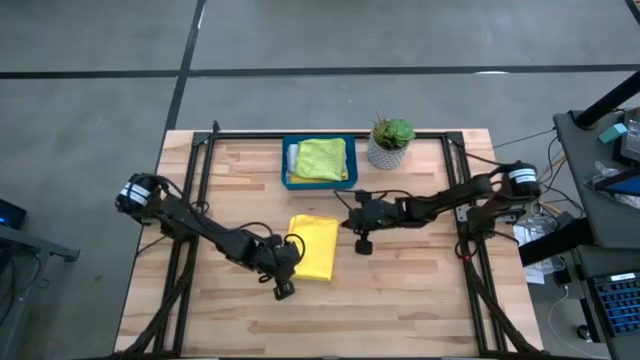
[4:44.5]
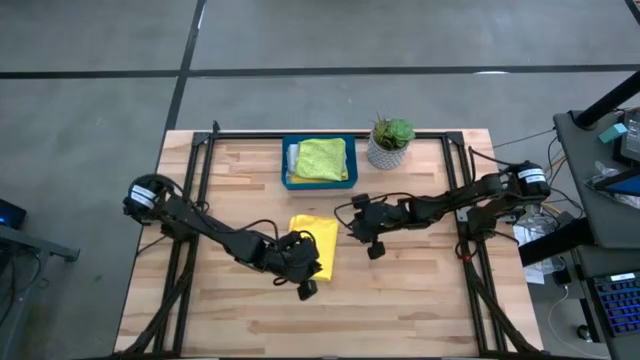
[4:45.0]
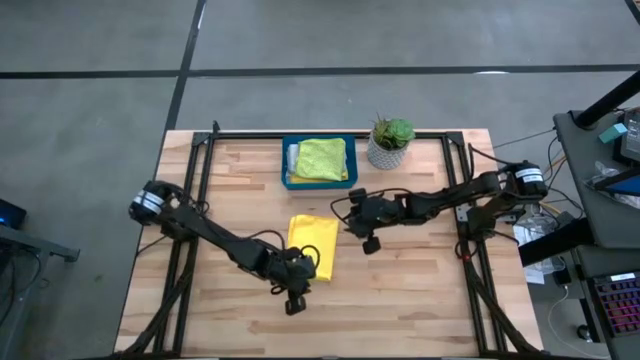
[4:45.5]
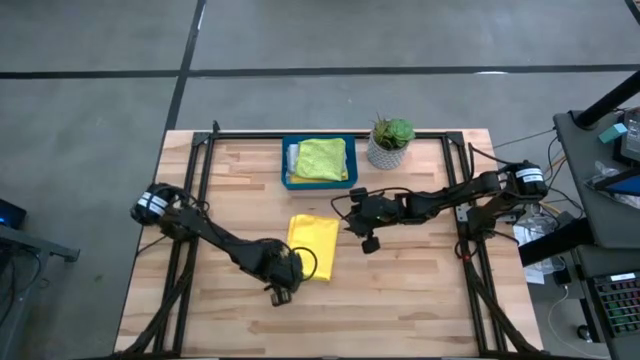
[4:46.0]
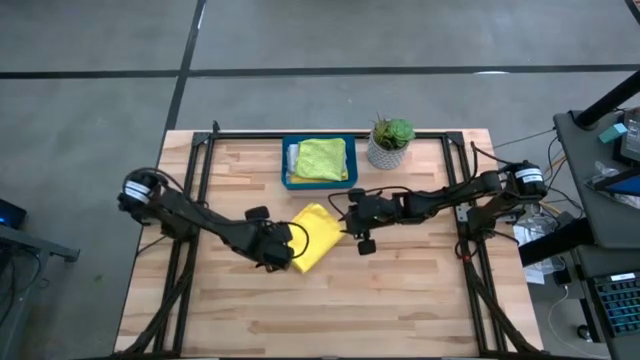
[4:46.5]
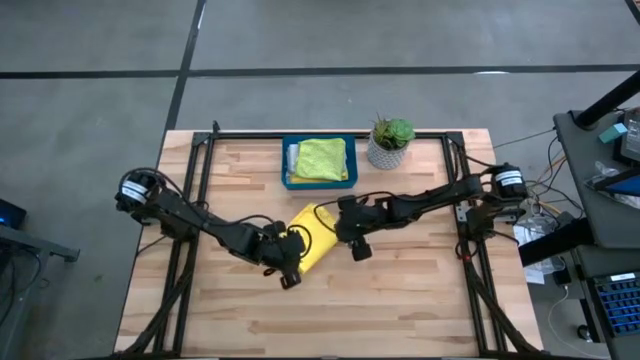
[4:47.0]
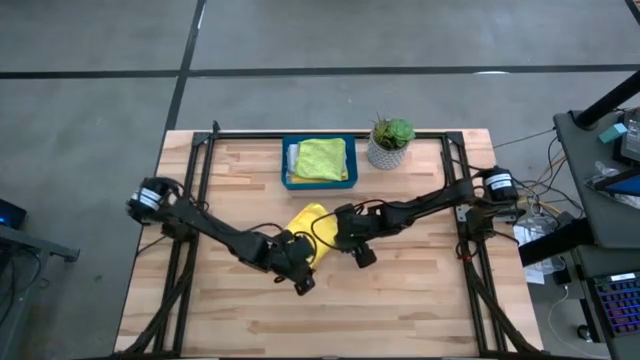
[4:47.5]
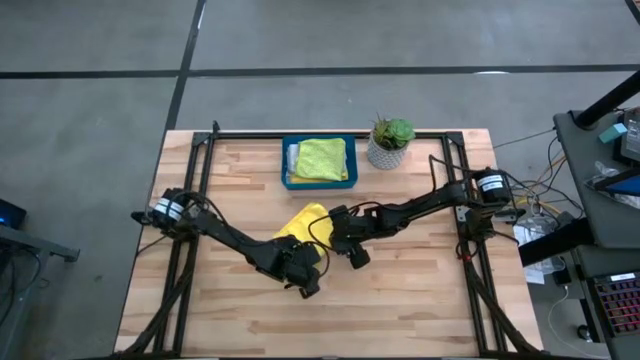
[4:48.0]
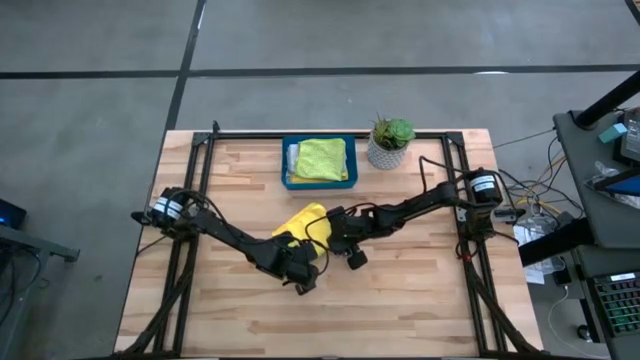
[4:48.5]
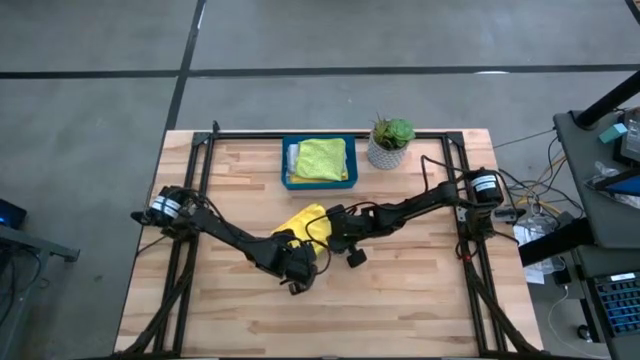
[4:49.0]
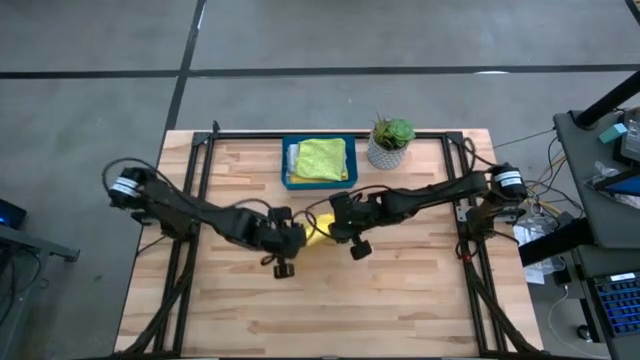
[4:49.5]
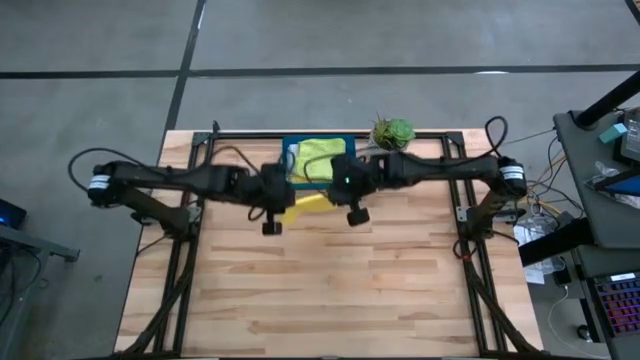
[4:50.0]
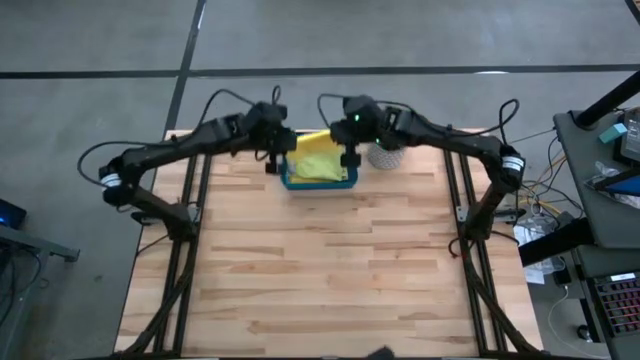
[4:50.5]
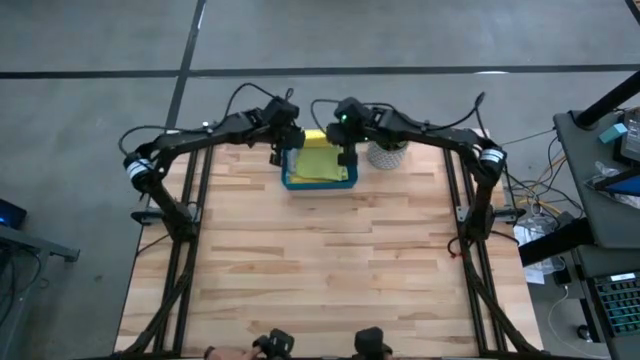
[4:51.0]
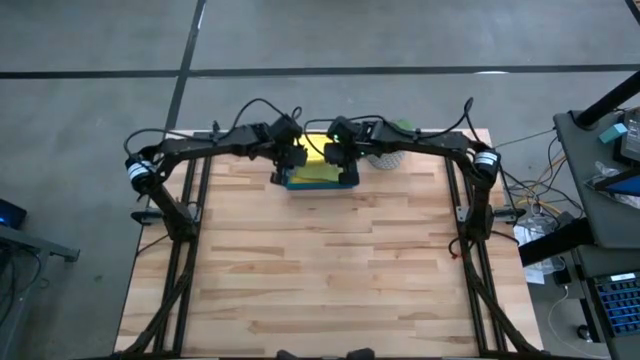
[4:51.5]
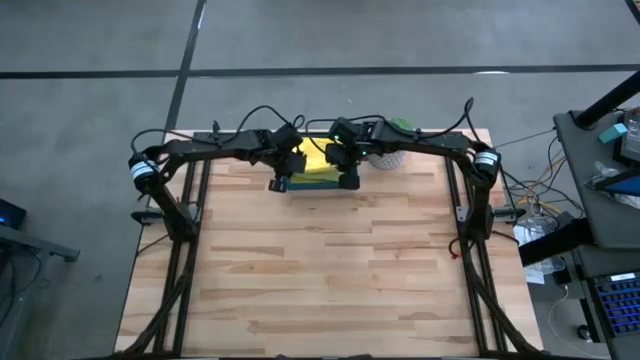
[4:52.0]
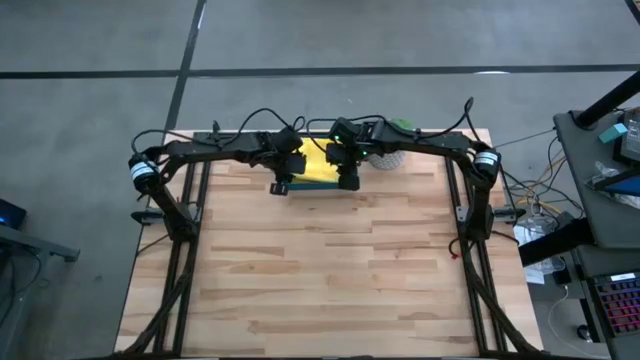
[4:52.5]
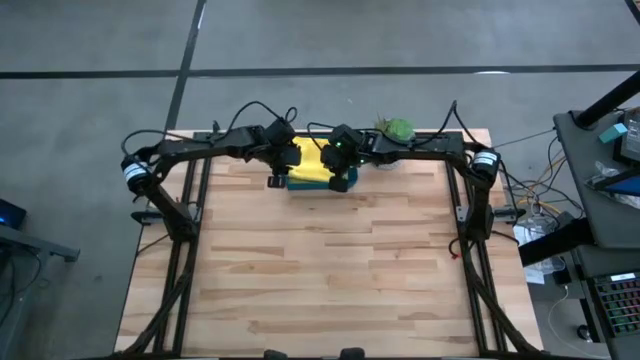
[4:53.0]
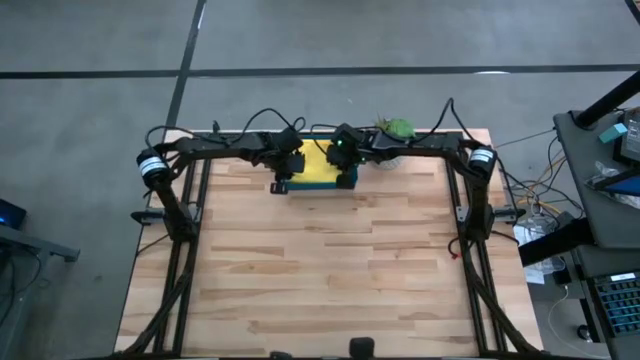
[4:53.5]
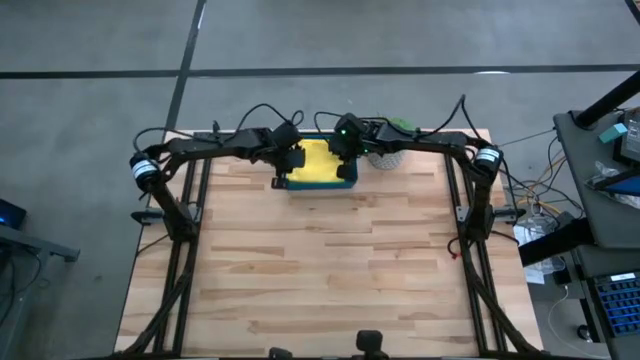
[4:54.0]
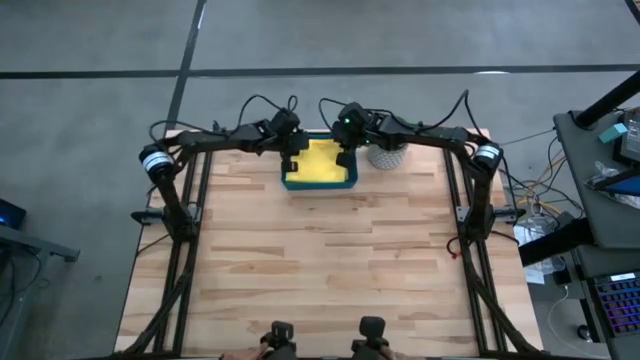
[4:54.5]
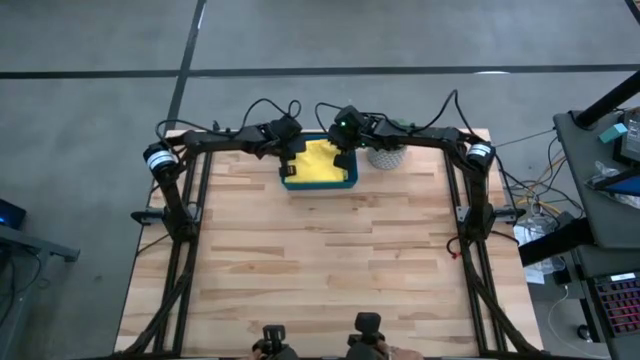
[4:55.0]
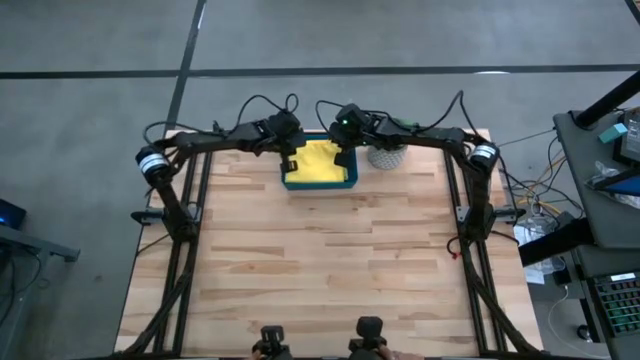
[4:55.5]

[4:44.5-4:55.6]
Task: Fold microfiber towels
Stack the folded yellow microfiber cloth on top of the green microfiber cloth

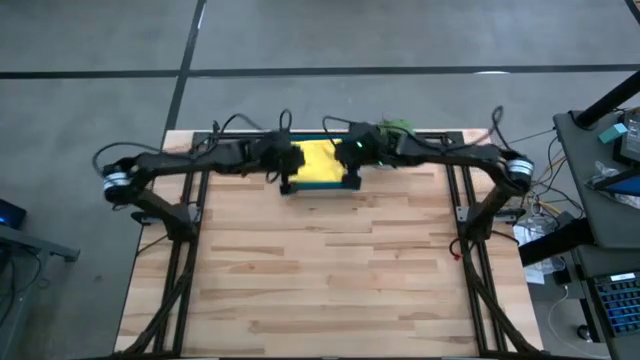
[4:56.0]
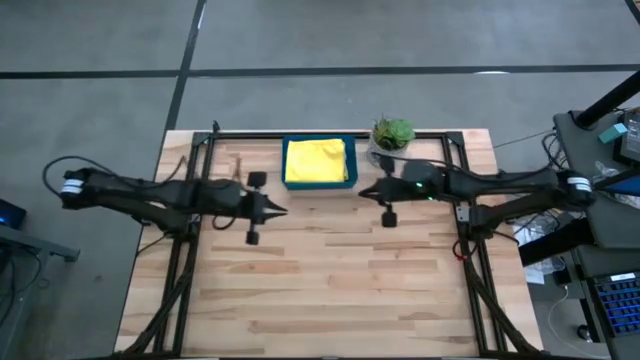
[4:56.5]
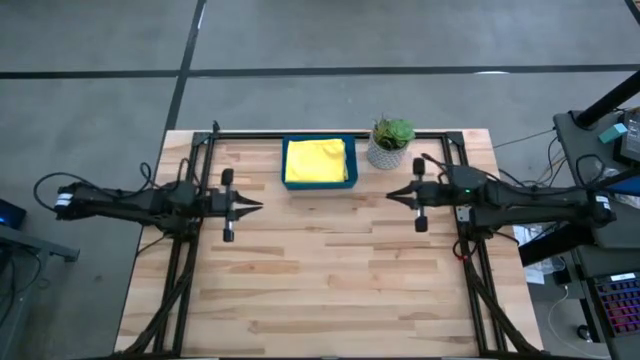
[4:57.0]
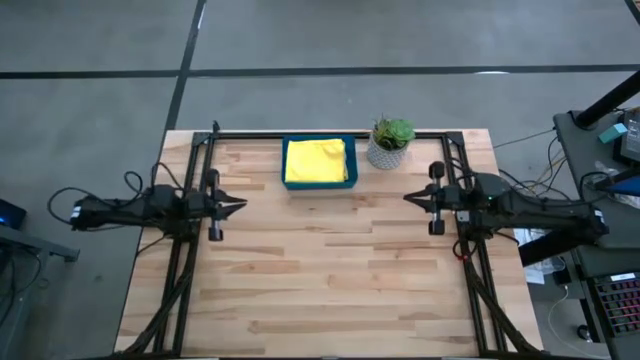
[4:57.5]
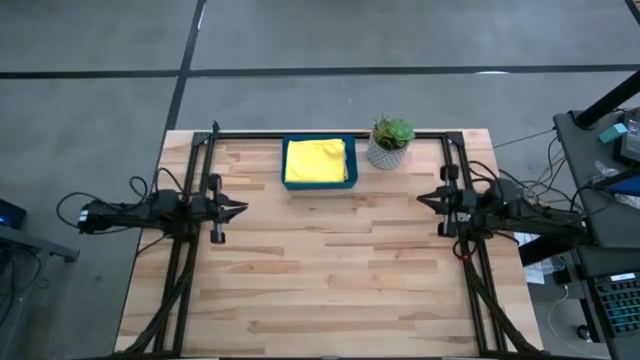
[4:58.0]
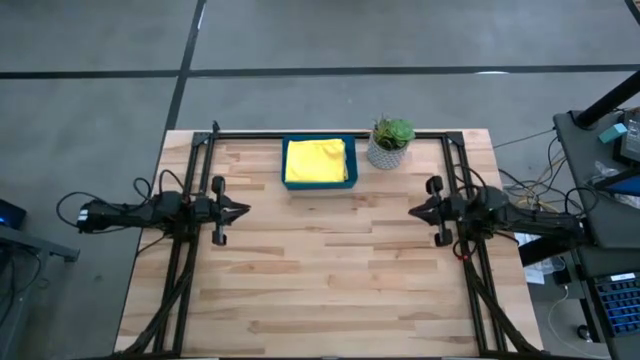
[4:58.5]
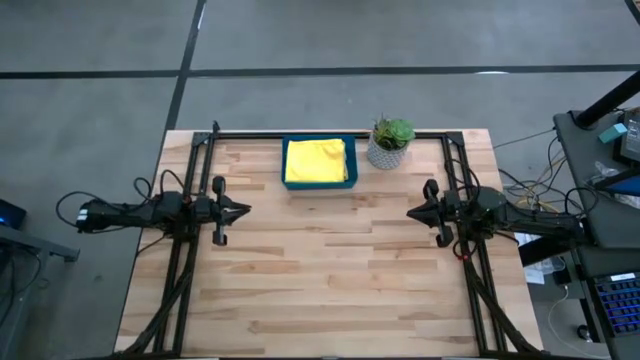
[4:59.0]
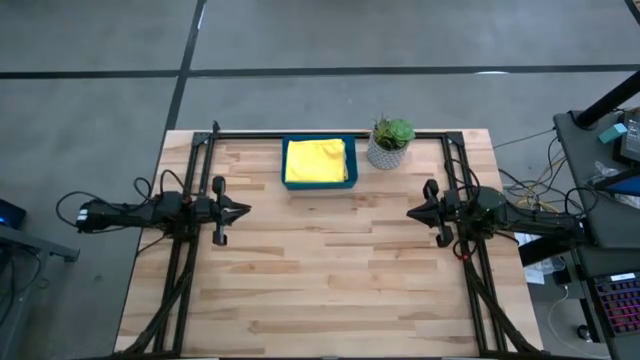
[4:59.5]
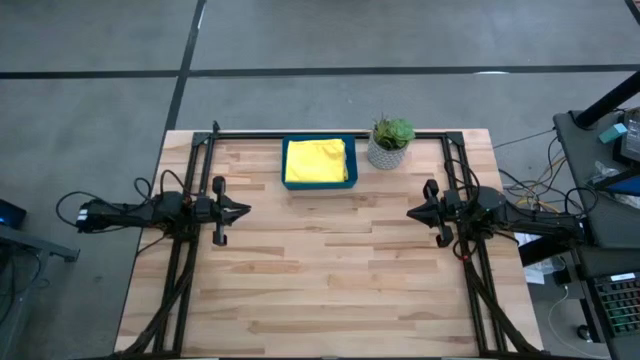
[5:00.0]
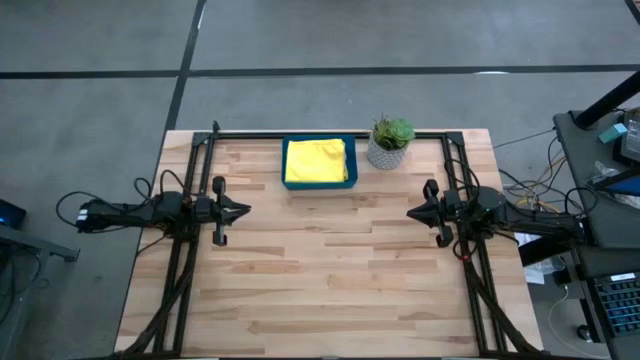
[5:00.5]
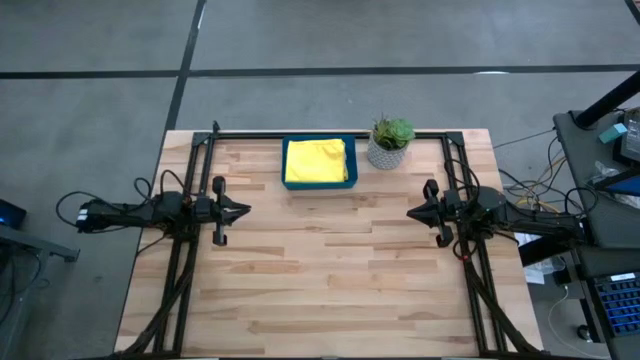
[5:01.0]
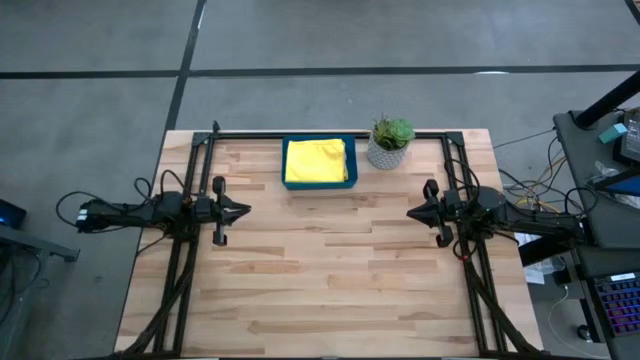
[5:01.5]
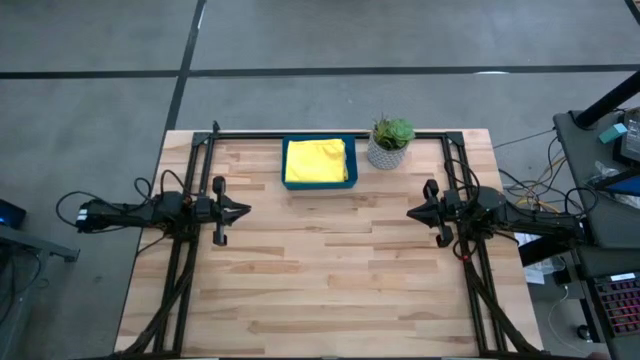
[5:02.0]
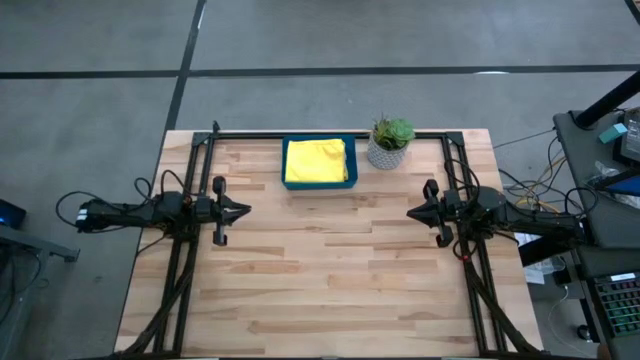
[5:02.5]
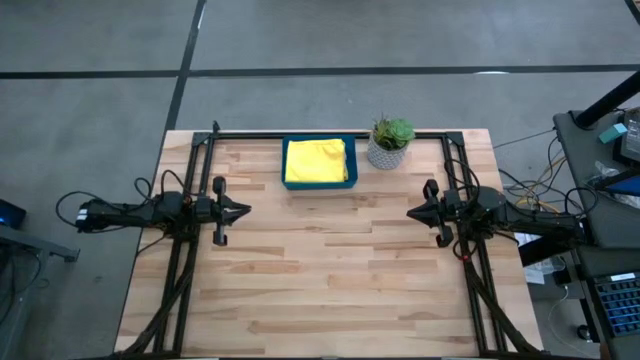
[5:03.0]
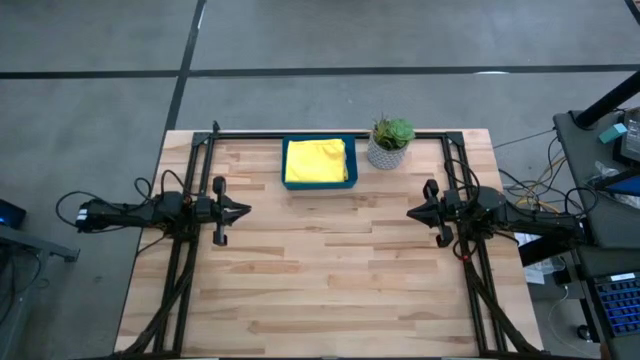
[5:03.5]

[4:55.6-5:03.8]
Return to Home Position

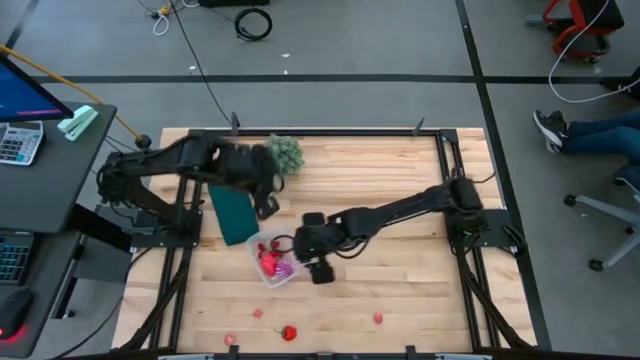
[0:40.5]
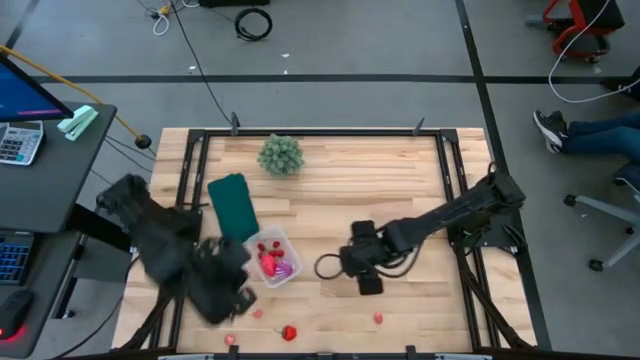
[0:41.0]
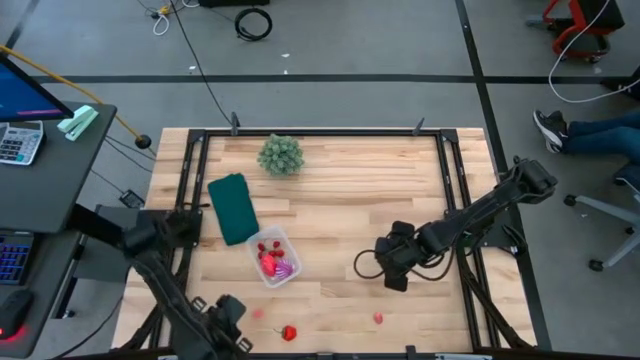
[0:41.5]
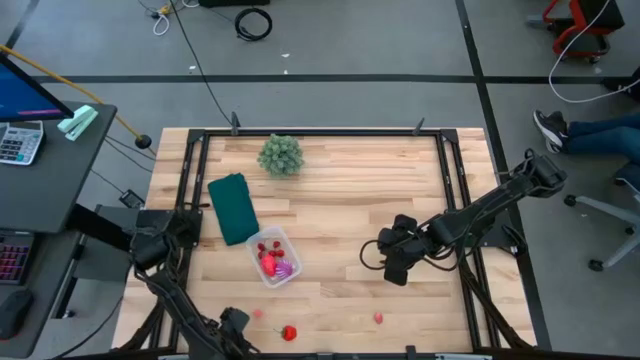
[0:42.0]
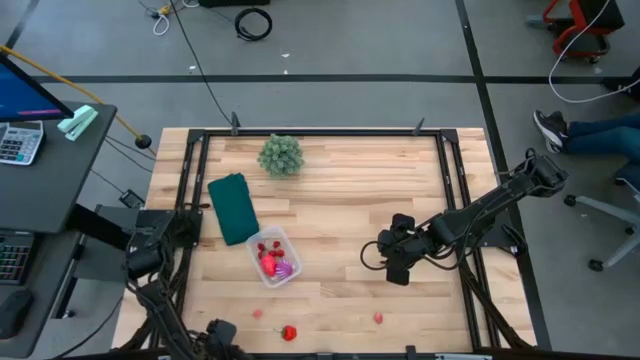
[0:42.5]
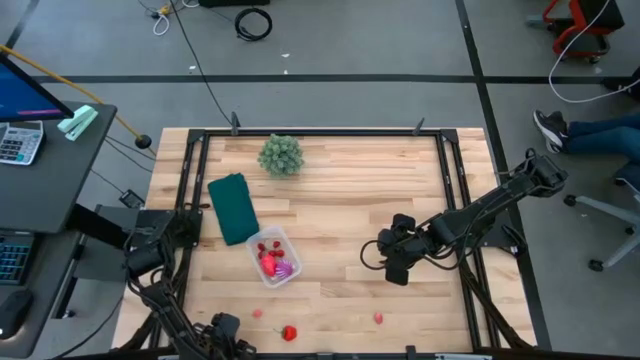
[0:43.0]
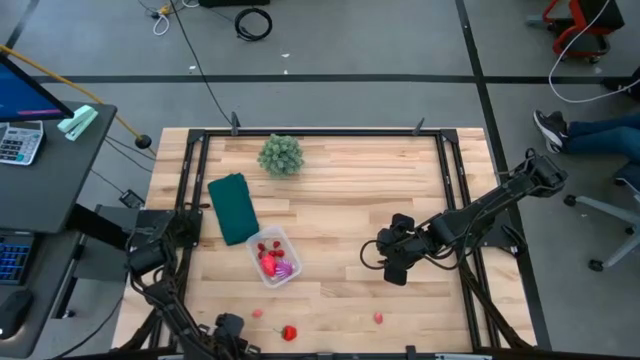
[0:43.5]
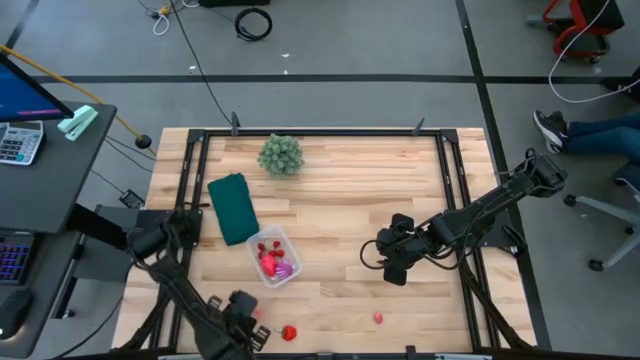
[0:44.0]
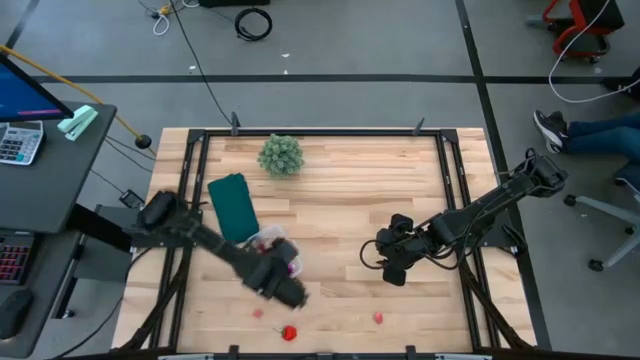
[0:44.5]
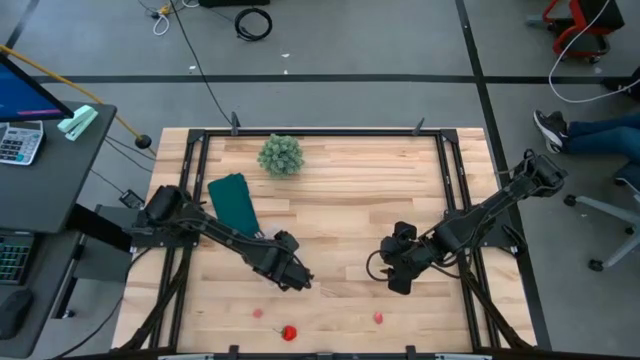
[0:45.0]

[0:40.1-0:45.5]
Task: Pick and placing Produce into tupperware
Put the bottom left pink peach into the transparent bin
